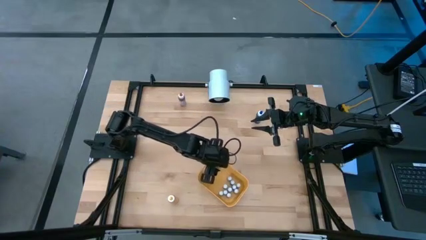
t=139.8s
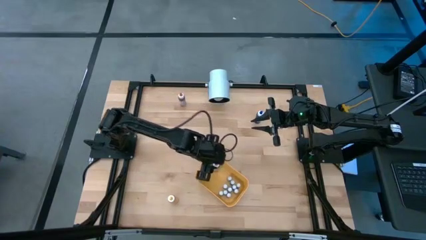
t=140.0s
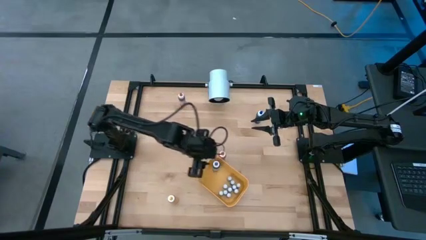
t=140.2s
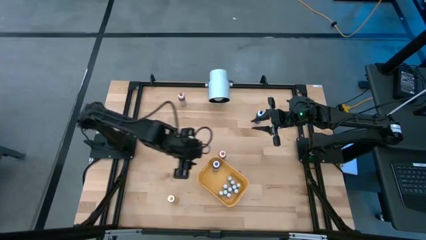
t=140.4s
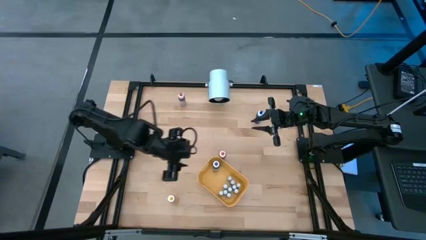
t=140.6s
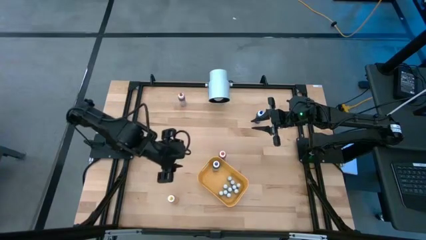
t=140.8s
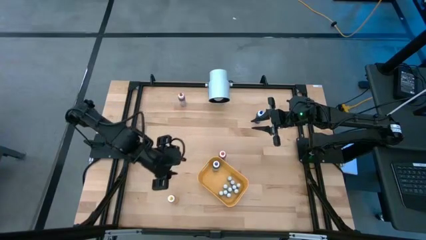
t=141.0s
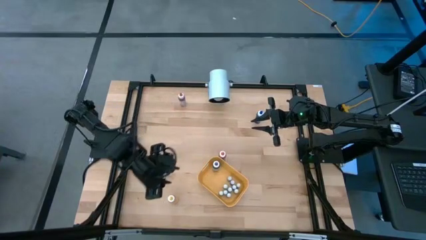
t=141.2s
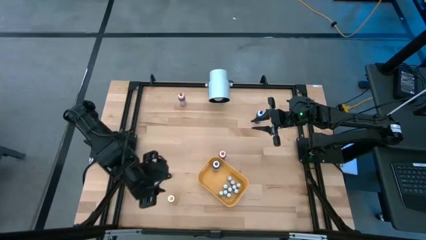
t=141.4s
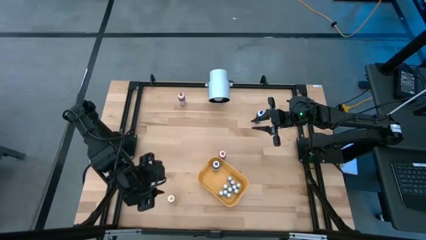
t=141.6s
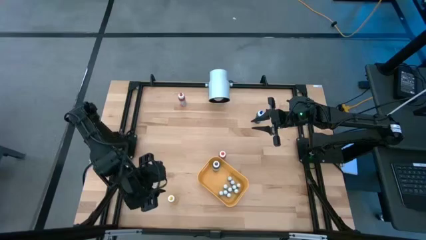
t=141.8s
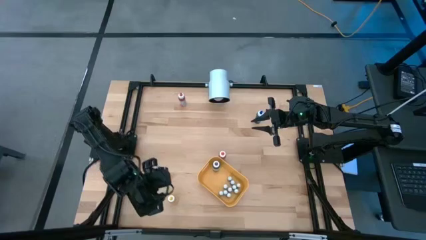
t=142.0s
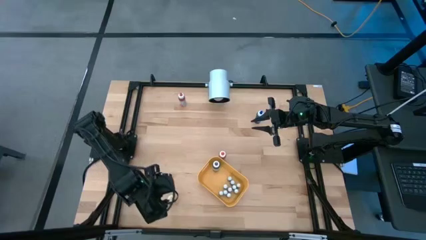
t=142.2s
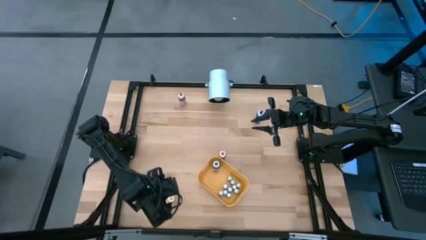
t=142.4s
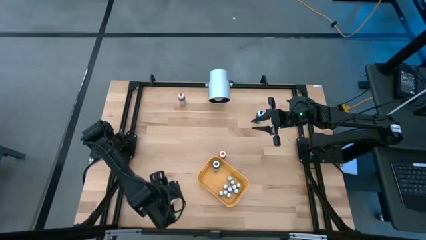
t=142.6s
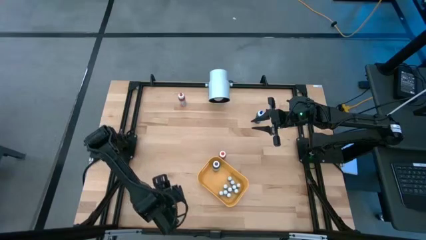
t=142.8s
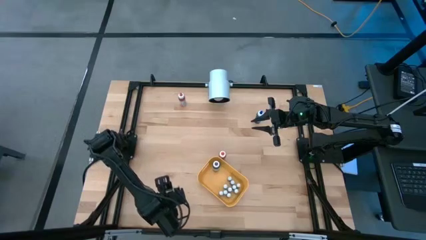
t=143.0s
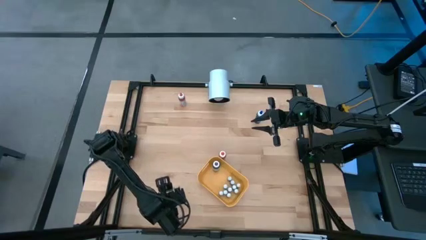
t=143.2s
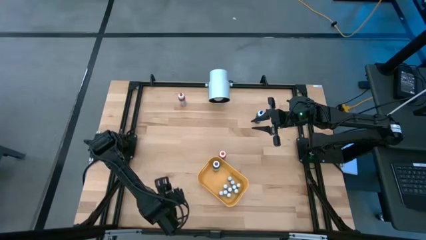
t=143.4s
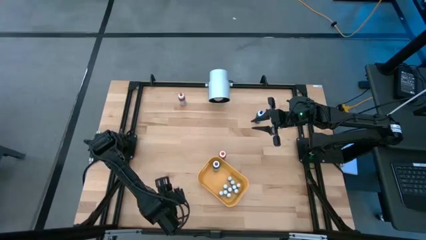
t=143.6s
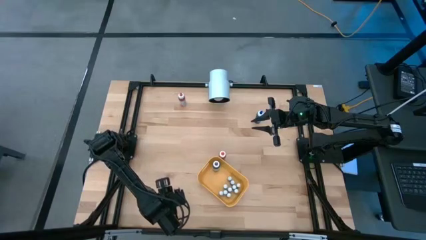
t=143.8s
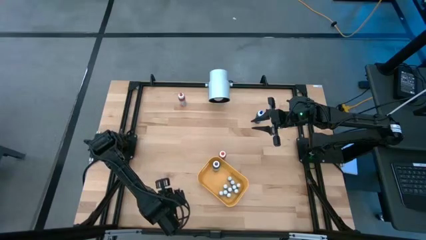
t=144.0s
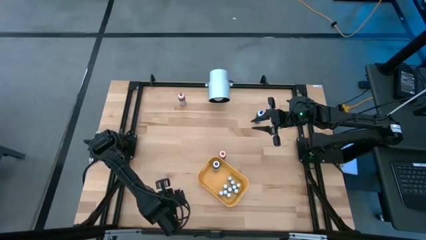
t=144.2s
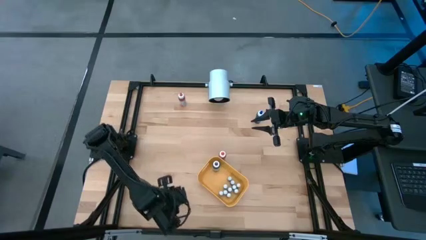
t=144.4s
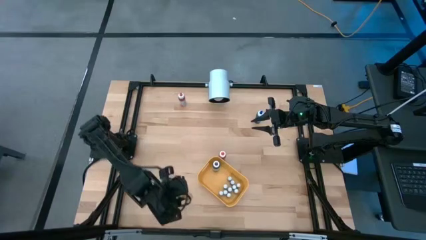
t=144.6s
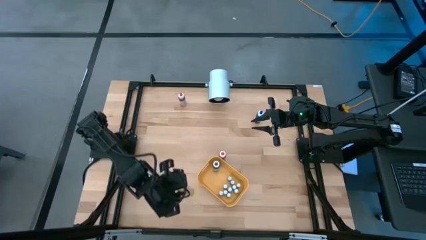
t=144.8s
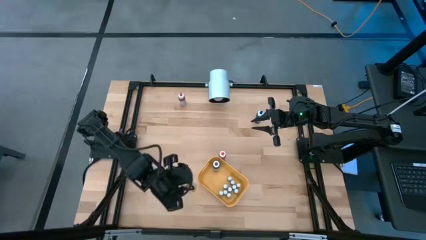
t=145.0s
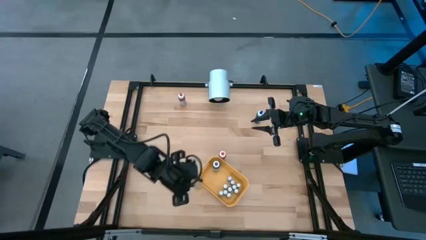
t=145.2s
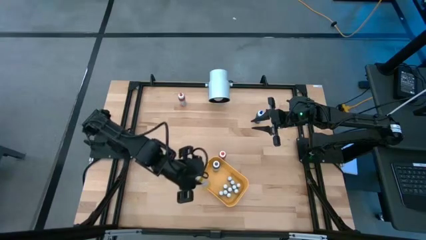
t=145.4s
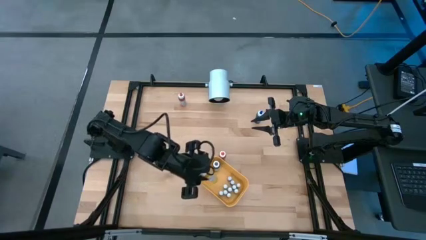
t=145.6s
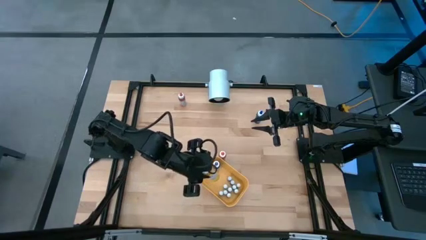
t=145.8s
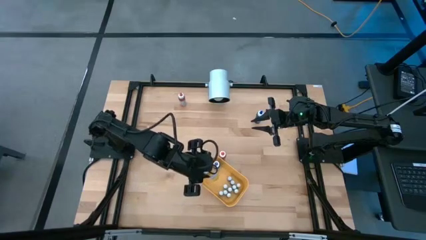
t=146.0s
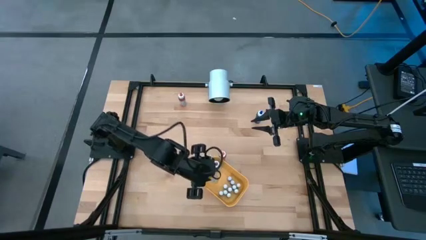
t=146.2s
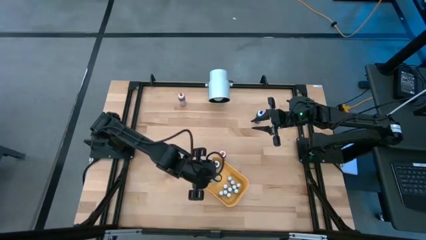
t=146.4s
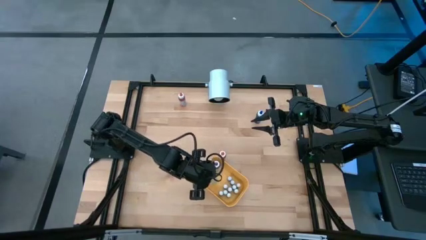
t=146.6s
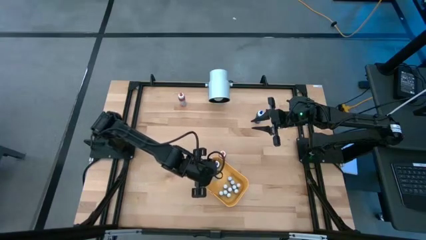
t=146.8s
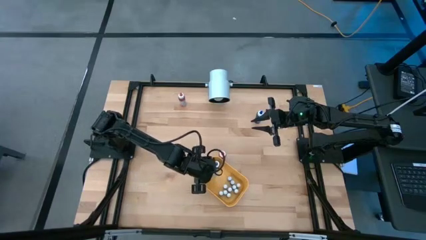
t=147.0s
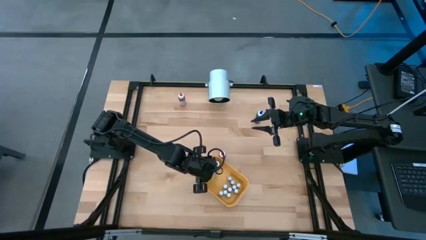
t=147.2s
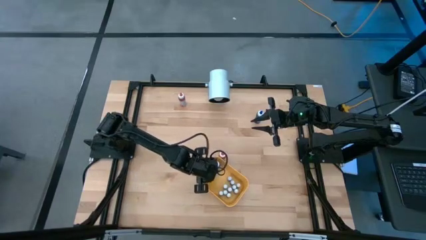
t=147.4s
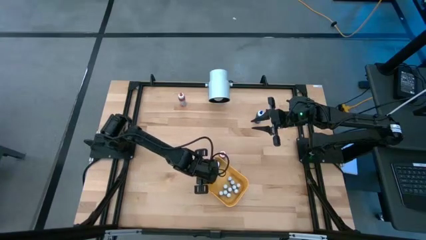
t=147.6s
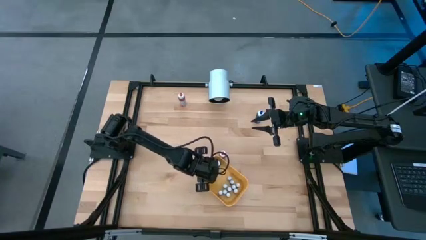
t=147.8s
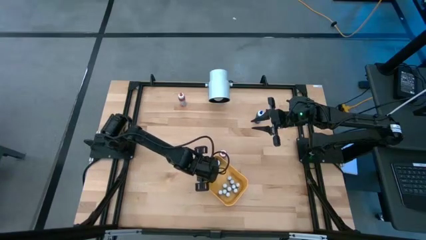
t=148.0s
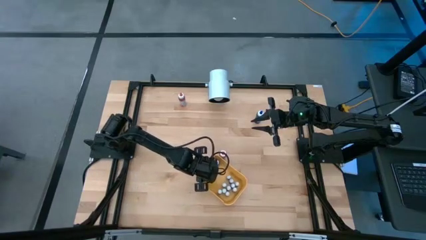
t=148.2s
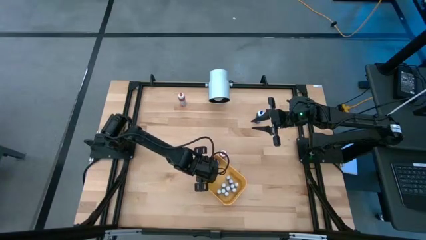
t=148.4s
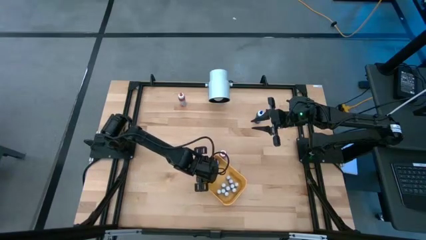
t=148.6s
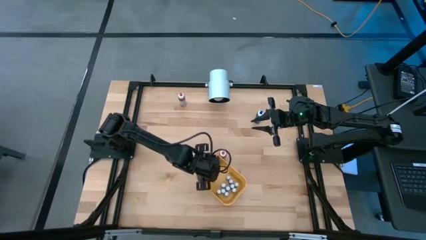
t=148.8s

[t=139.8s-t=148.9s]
Task: Pick & Place food coloring
Put the large yellow food coloring bottle into the yellow container

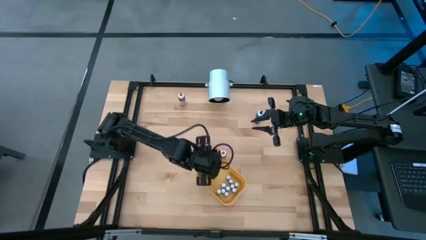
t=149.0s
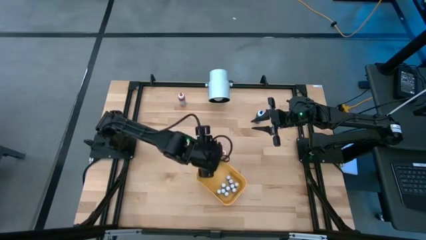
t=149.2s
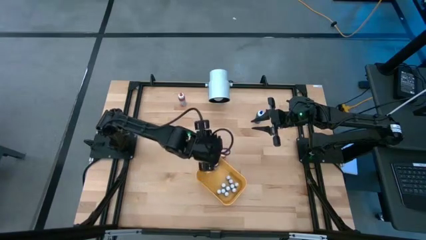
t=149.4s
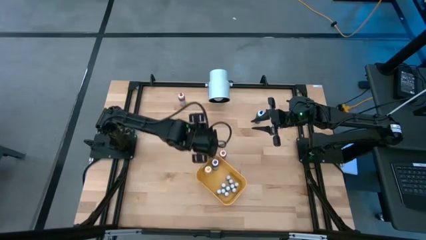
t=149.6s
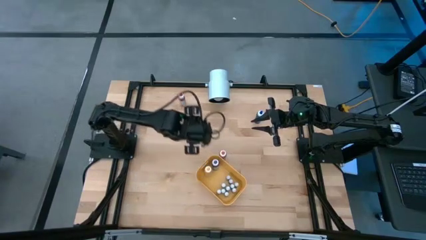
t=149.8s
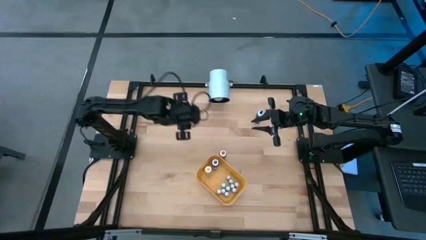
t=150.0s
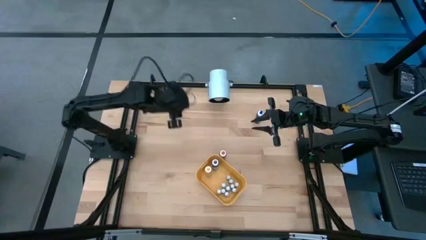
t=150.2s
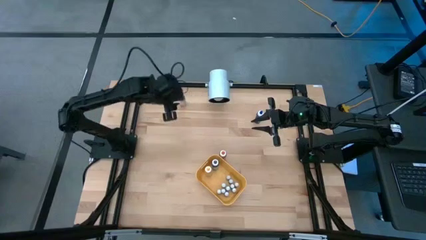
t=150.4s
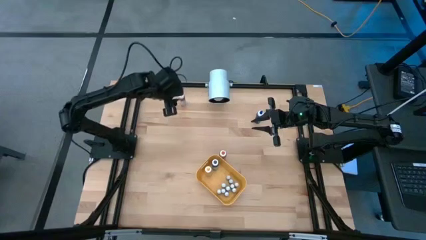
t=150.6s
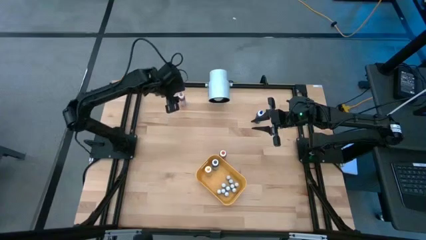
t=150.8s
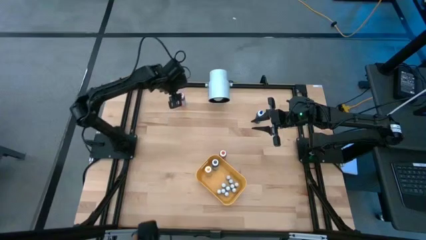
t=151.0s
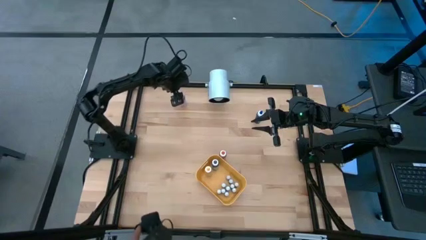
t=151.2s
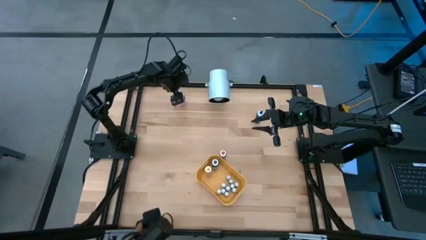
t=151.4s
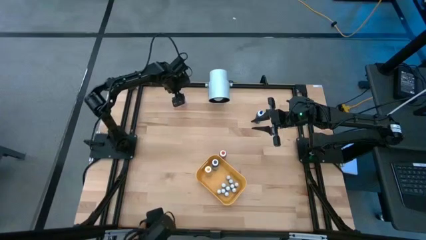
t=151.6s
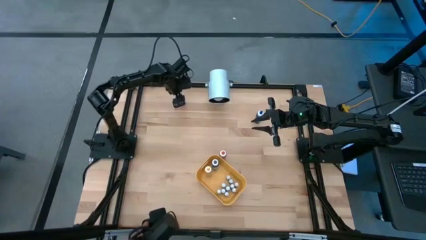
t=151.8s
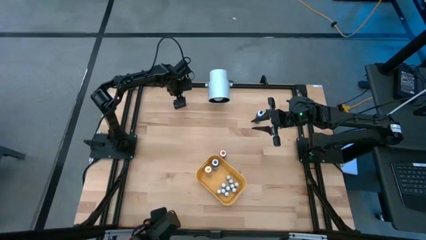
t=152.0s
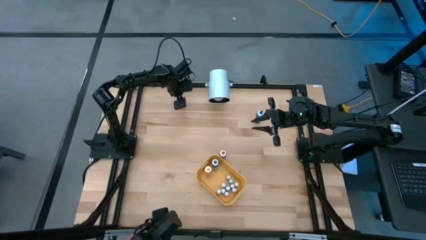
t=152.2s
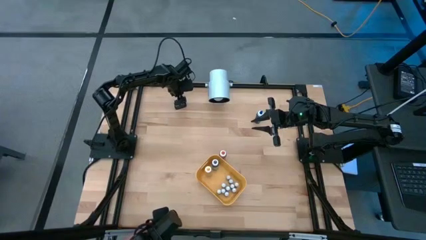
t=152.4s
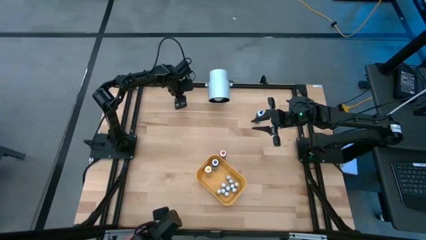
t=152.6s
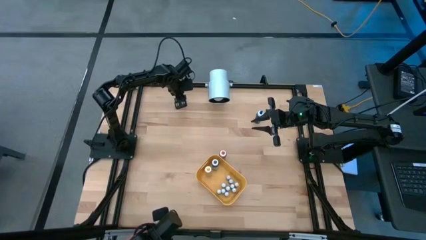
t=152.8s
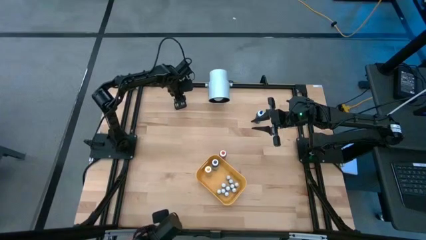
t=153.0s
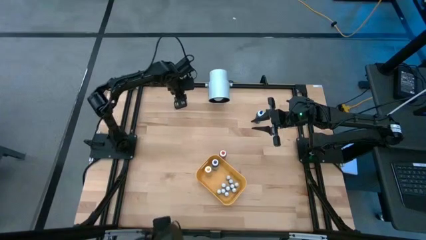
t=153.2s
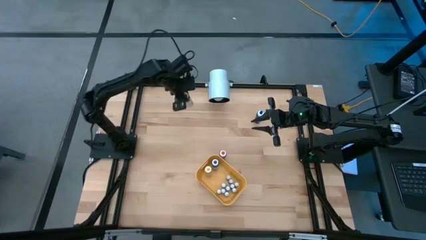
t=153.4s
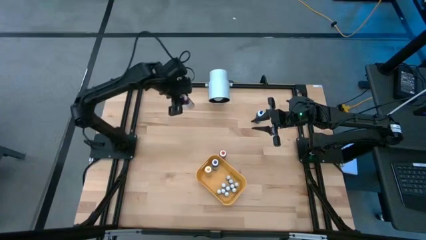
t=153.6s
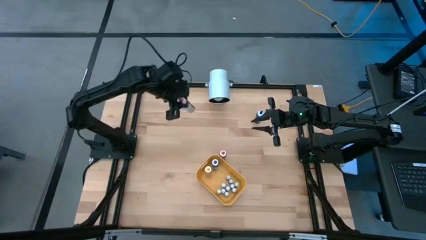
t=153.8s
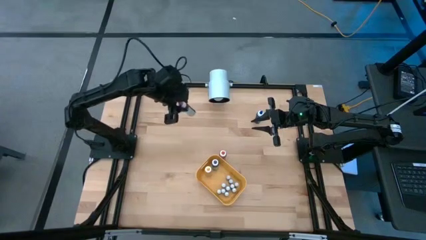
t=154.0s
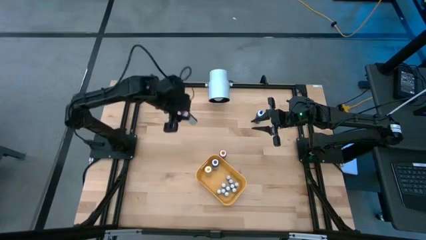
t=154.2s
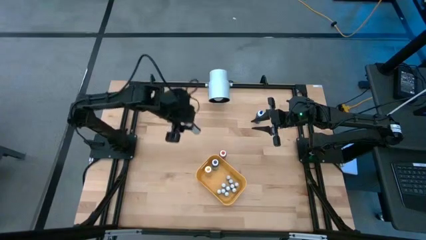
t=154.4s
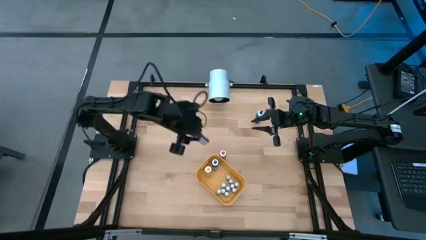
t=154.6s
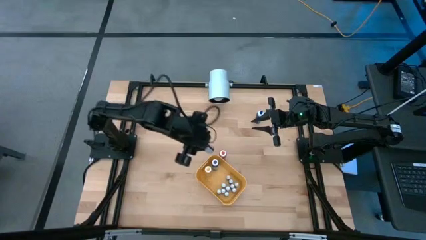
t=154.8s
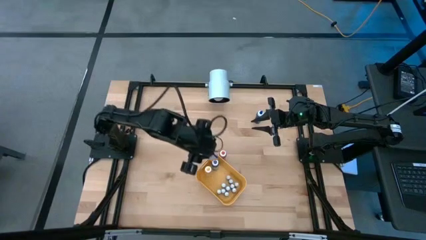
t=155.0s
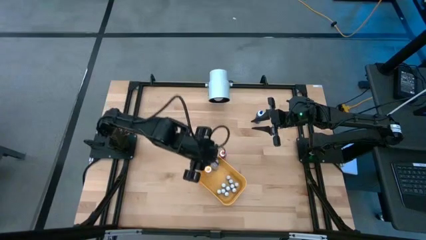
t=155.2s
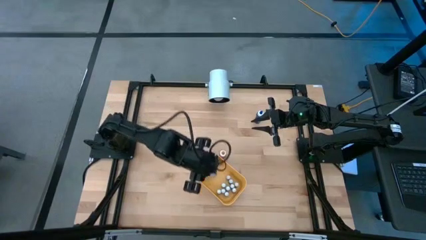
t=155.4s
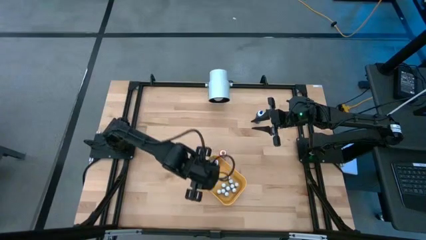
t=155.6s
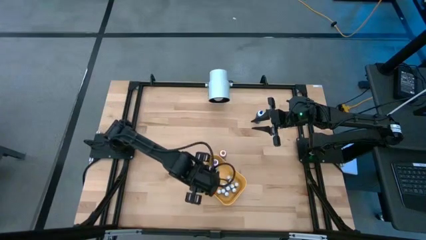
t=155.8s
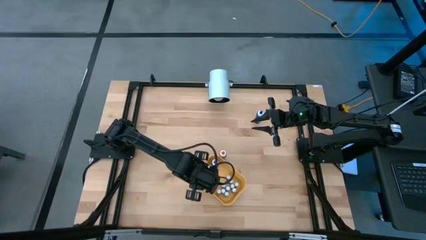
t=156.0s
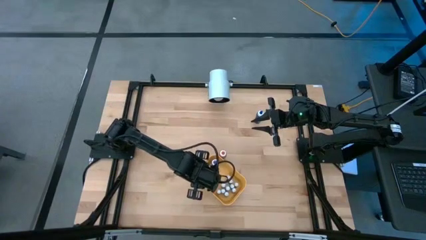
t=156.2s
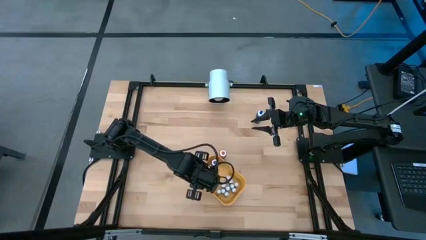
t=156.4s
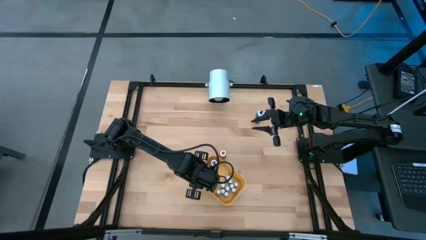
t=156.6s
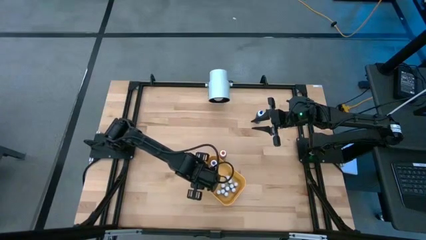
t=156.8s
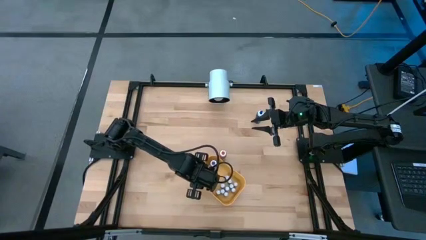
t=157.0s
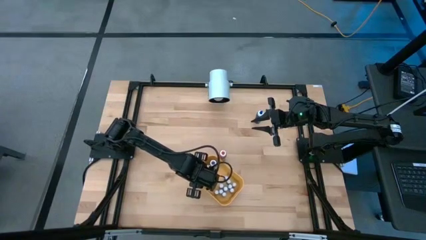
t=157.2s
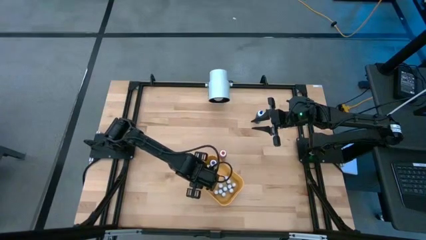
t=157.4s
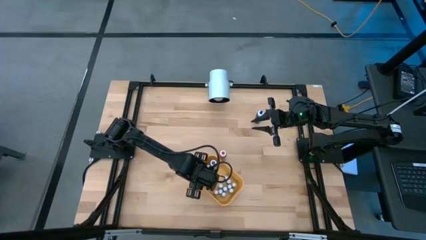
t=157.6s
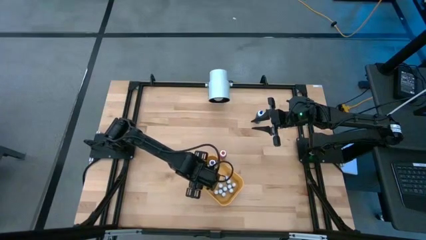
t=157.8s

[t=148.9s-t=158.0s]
Put the large pink food coloring bottle into the yellow container
